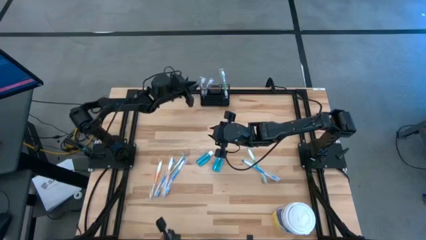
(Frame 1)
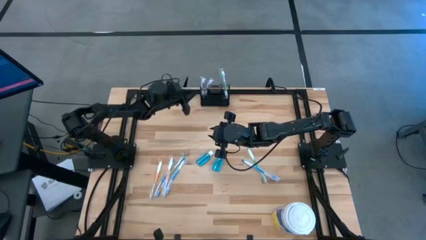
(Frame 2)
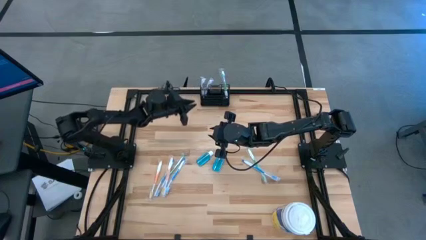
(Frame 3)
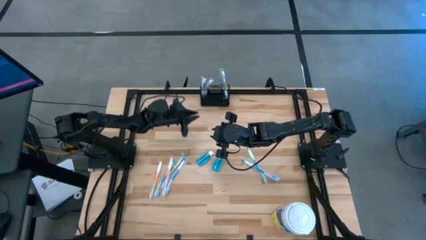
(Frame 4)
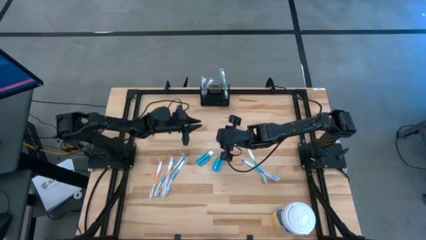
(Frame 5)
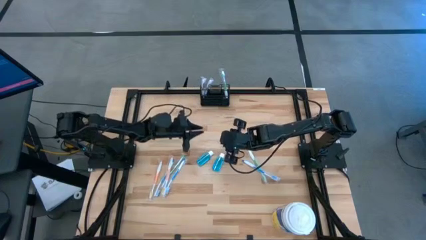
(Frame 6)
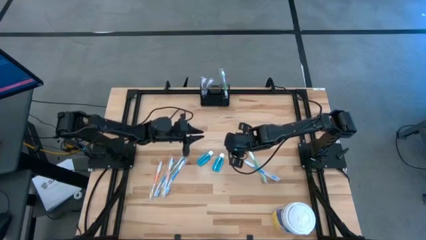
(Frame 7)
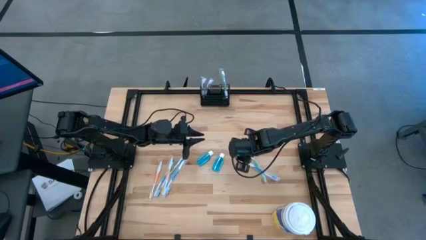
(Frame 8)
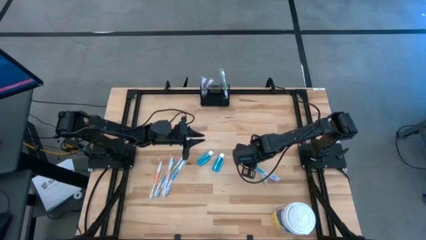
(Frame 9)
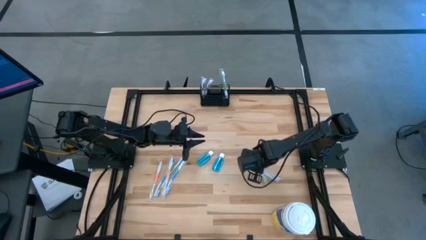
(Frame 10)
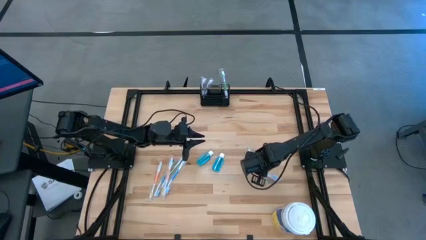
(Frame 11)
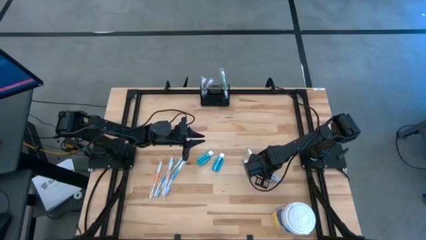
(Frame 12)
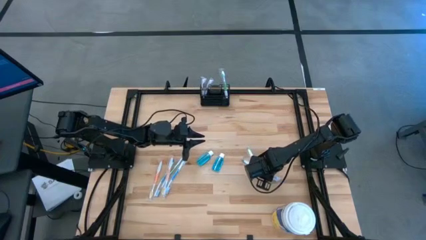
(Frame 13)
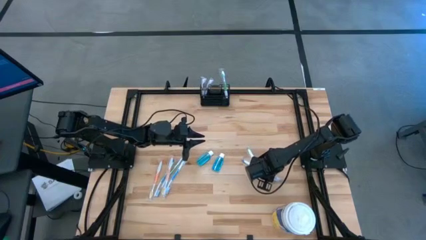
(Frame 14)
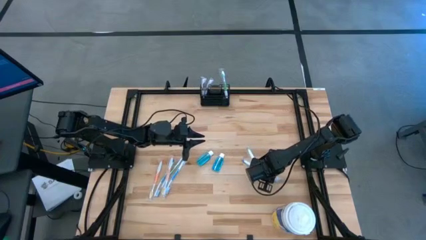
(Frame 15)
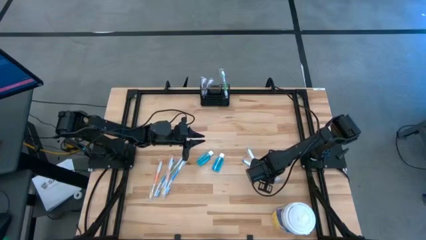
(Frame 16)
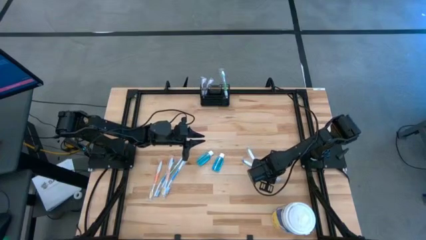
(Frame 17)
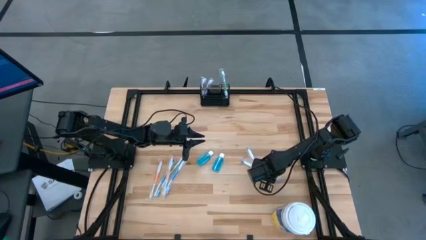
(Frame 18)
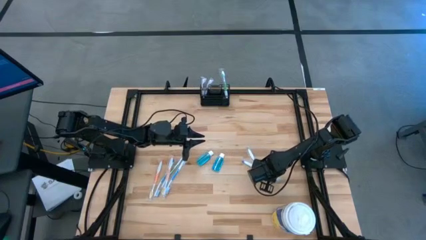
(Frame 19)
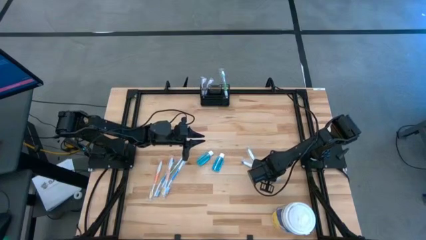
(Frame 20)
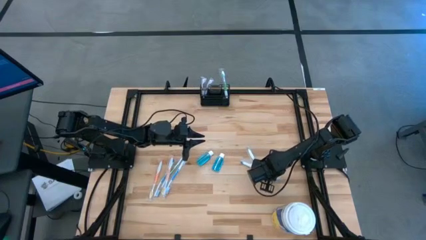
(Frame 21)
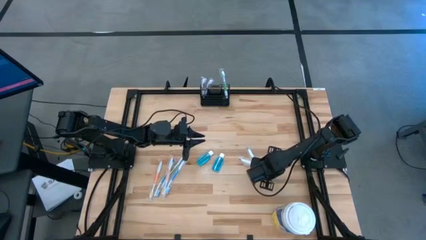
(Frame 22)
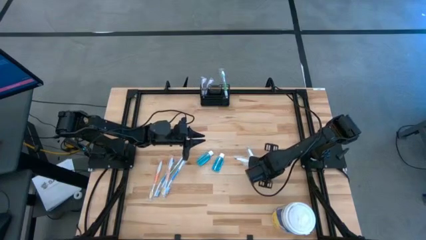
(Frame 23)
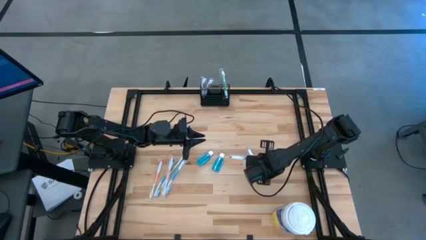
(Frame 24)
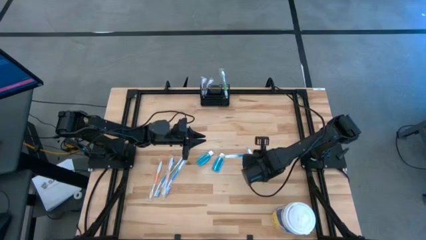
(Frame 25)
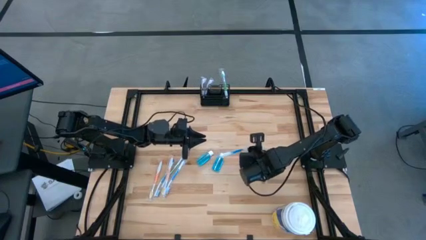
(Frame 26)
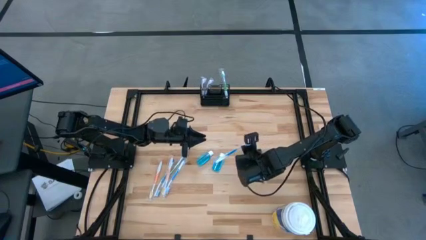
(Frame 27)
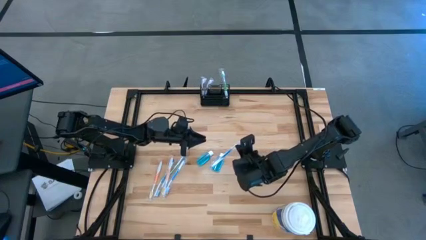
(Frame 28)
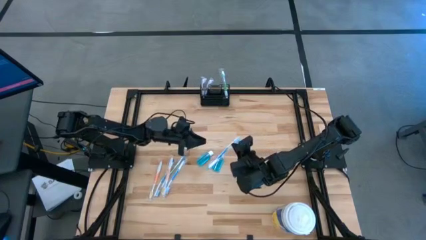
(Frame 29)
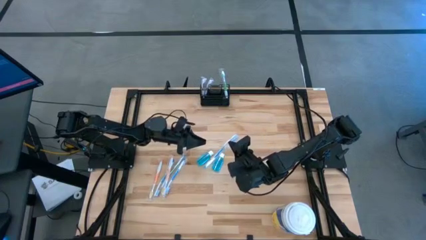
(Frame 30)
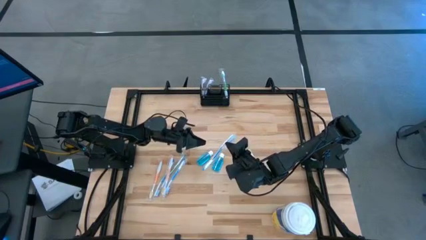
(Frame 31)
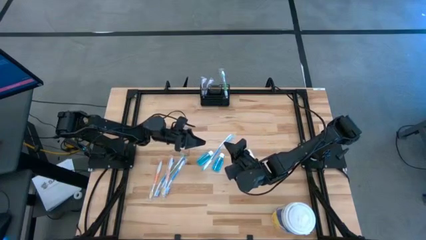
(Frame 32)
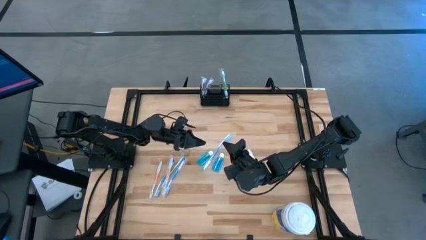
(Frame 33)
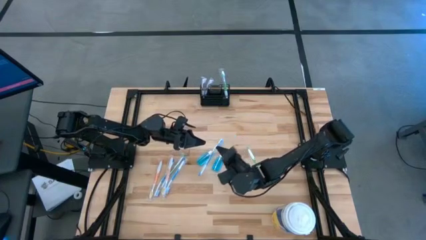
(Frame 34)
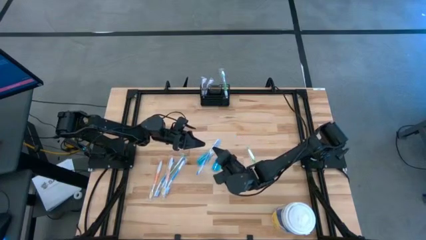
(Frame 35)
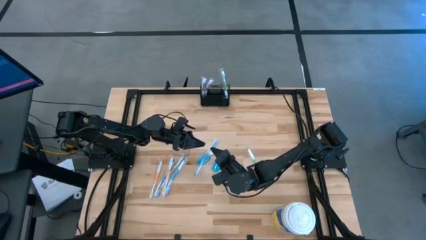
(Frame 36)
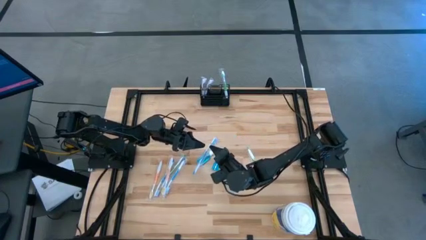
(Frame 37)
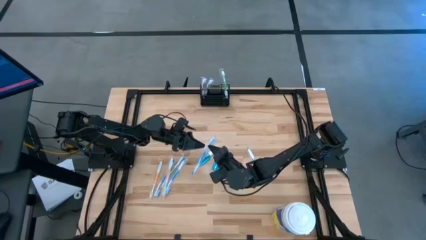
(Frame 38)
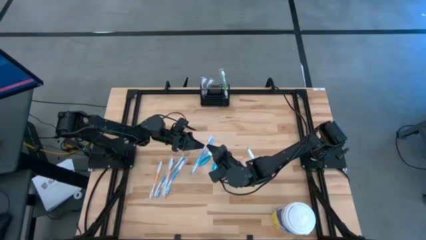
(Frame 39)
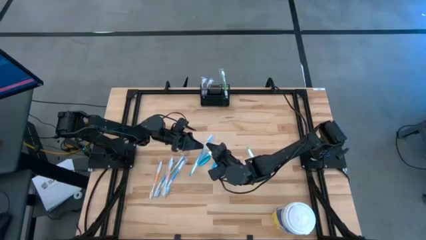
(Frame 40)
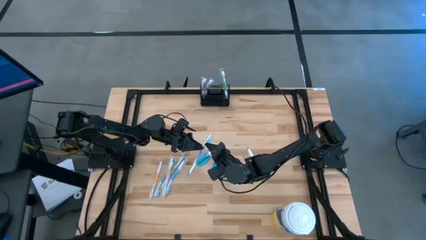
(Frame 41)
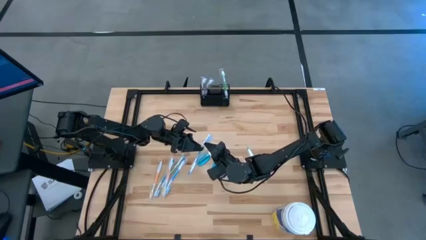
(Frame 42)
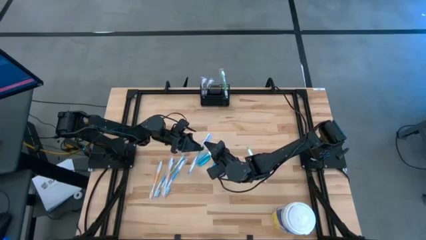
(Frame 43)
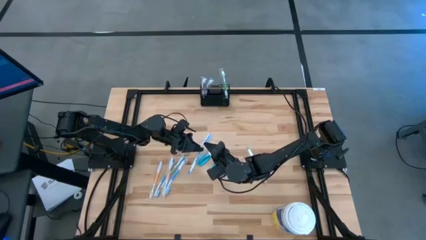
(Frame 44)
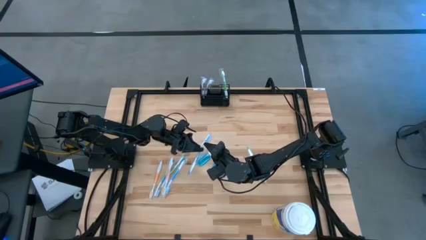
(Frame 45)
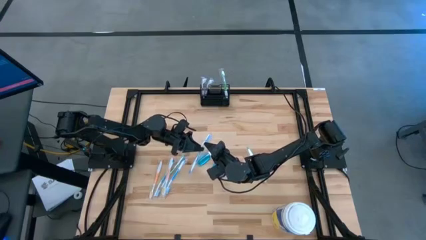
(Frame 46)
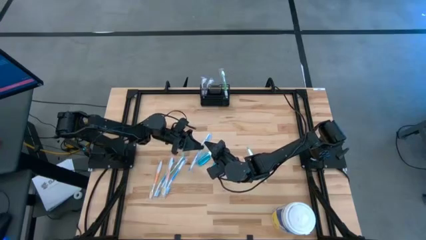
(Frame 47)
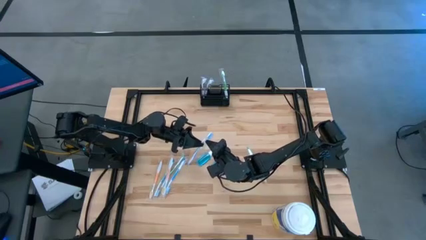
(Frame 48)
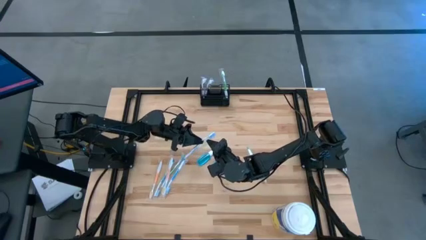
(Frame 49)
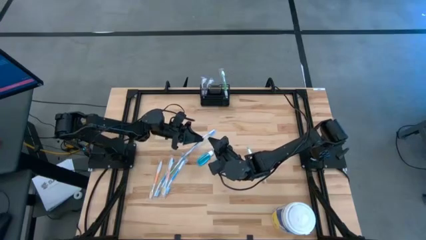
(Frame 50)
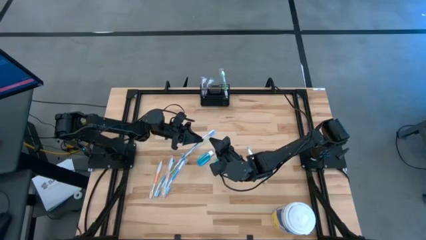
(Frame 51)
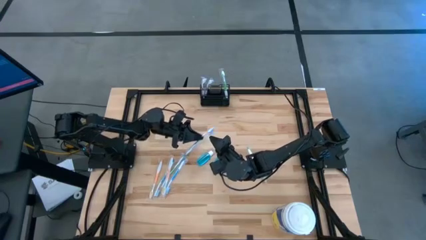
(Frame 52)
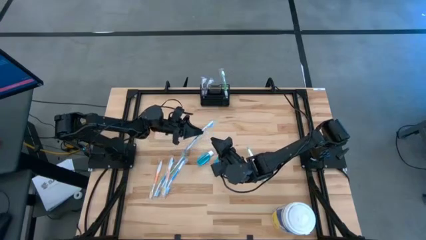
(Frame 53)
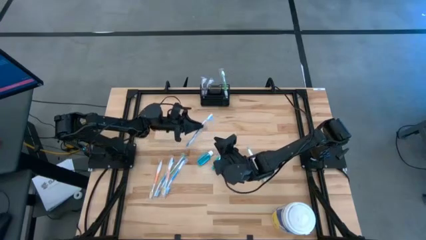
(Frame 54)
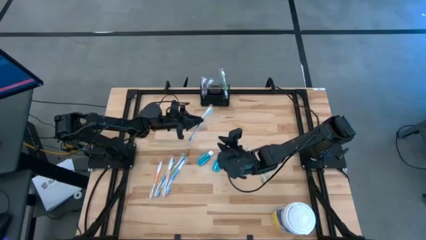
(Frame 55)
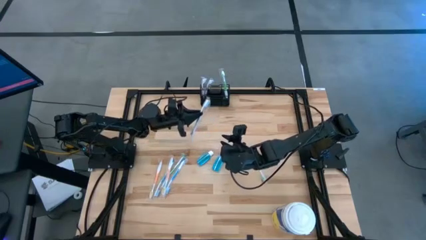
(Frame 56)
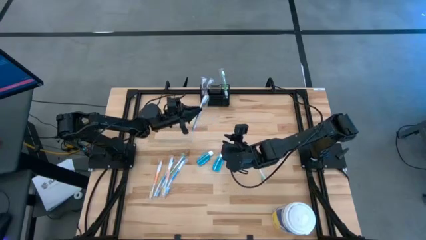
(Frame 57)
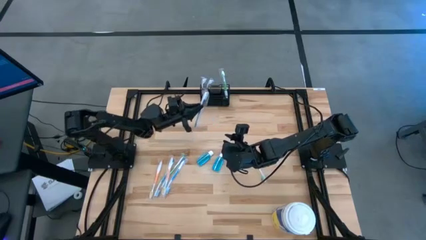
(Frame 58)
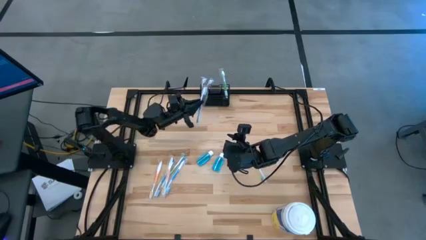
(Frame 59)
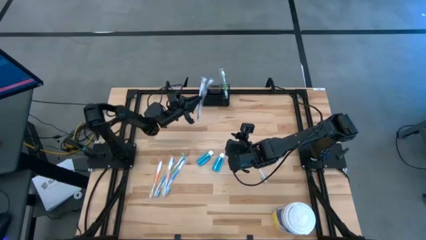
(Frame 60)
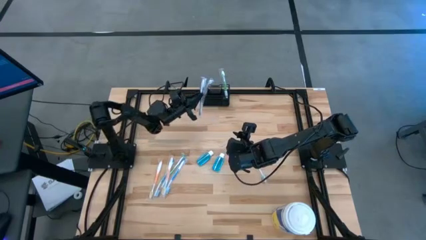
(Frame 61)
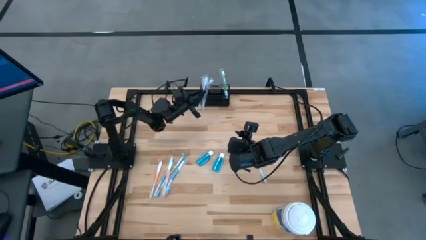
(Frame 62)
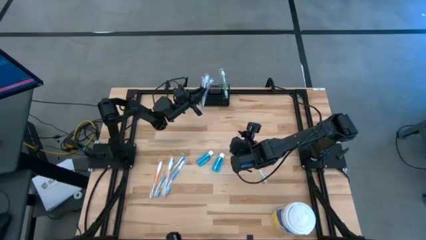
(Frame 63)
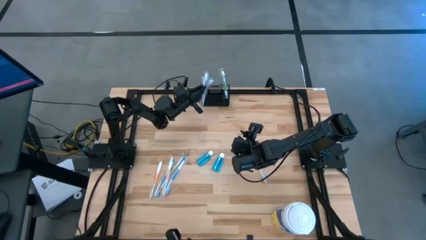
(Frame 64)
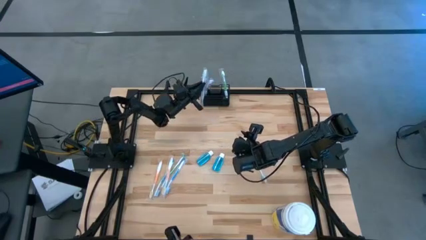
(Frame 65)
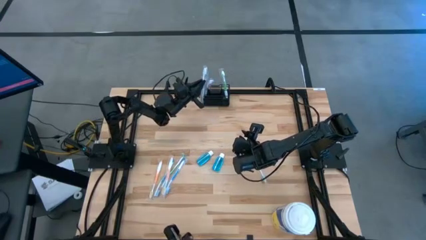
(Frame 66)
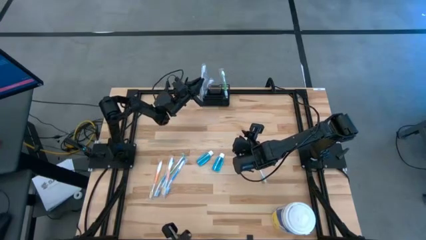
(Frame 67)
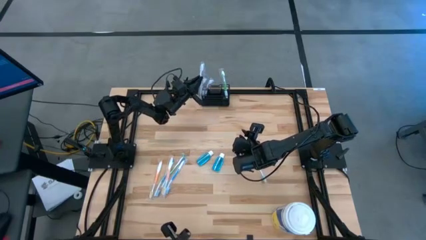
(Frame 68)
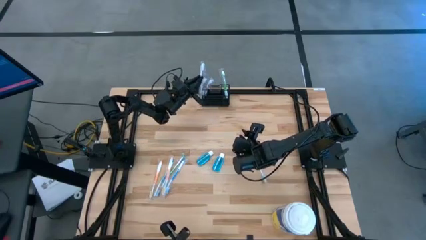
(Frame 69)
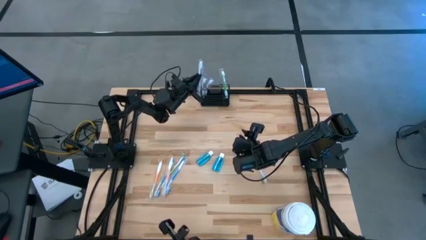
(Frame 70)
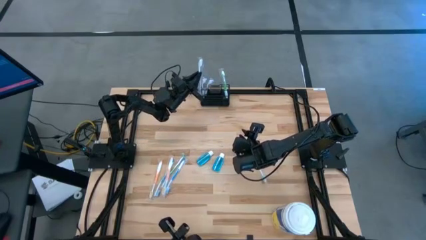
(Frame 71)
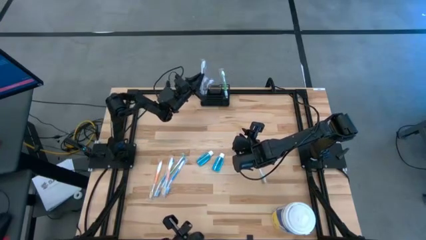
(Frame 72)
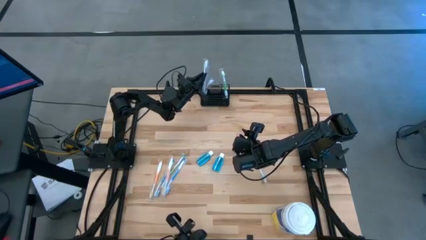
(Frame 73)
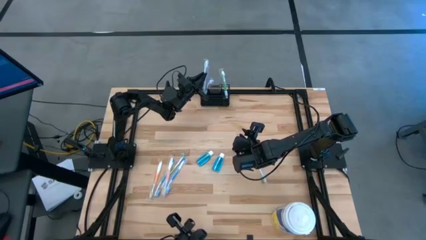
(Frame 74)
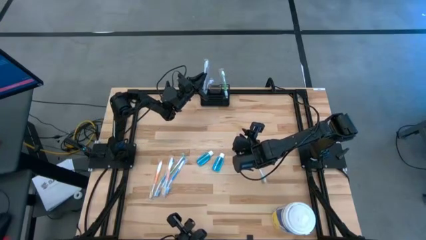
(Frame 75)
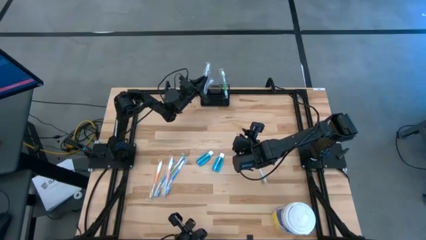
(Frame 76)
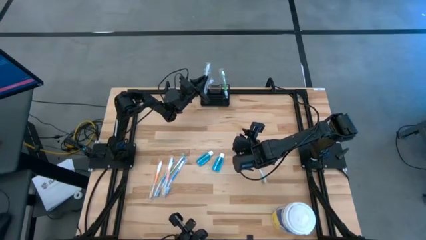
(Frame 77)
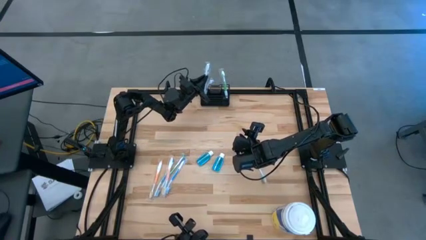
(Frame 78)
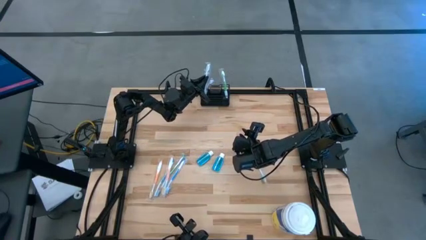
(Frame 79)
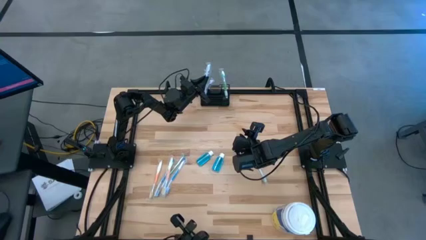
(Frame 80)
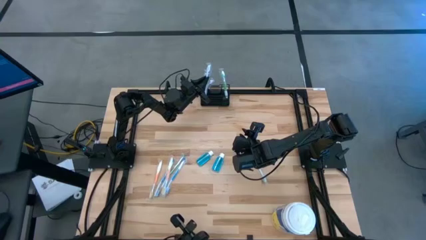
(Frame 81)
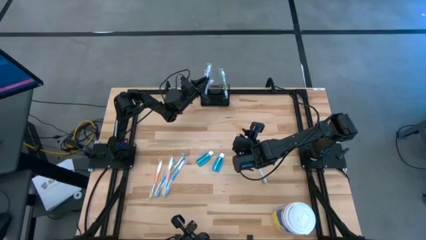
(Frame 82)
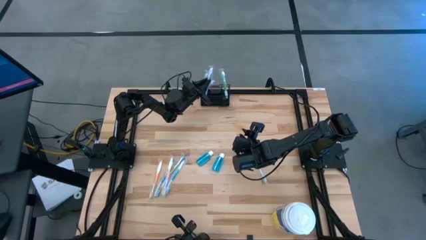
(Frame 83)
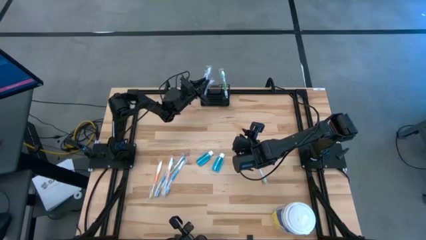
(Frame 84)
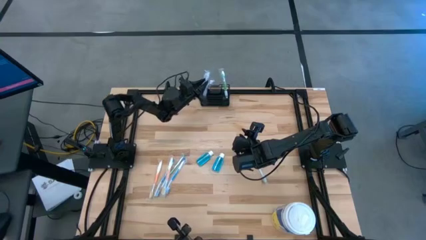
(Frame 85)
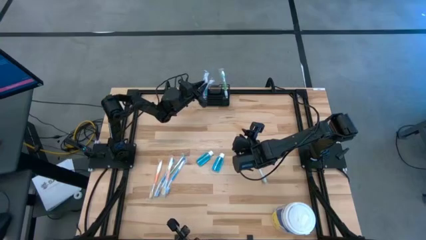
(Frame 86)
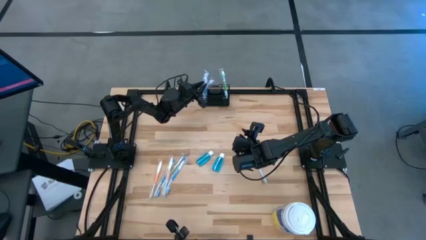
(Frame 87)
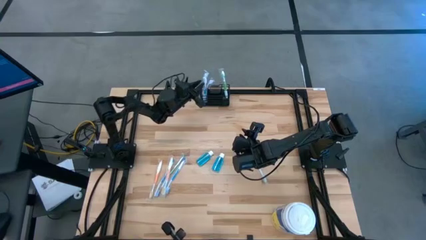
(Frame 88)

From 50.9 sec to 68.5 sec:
Task: Pick & Place toothbrushing station
Put the right blue toothbrush into the black wire organizer
